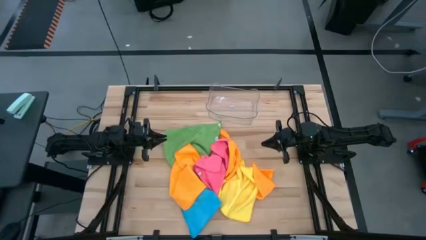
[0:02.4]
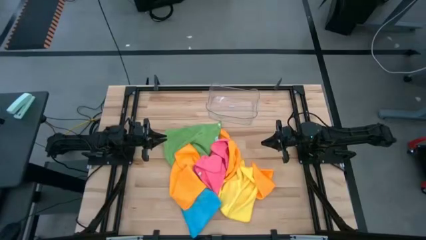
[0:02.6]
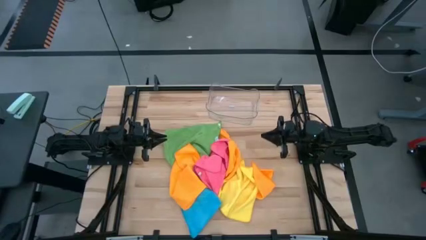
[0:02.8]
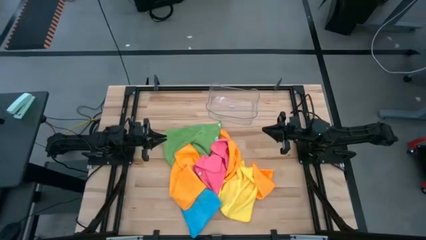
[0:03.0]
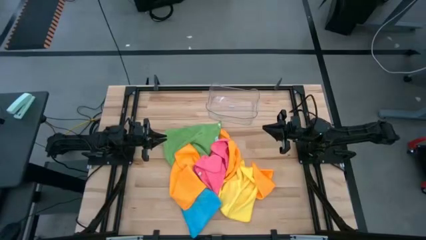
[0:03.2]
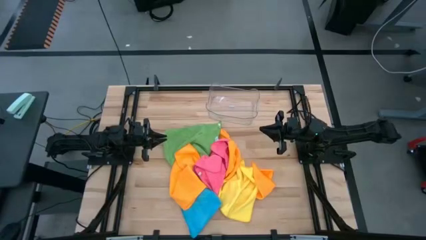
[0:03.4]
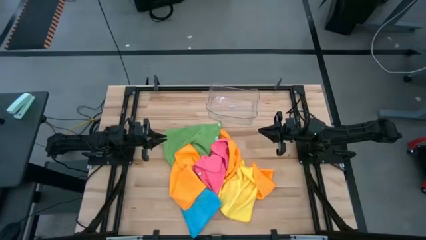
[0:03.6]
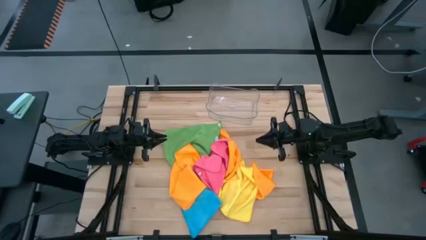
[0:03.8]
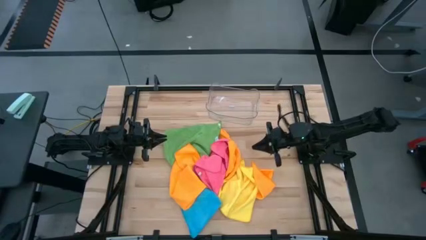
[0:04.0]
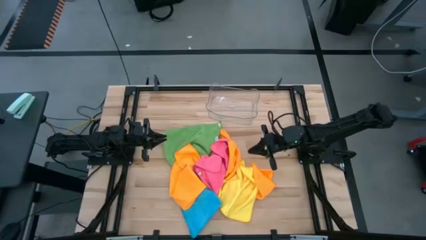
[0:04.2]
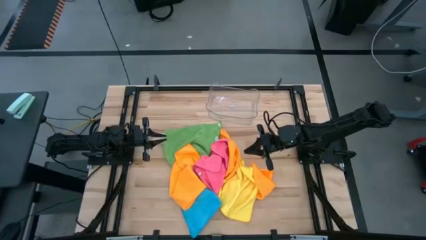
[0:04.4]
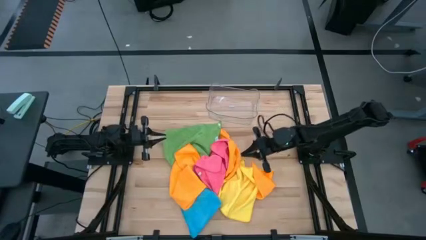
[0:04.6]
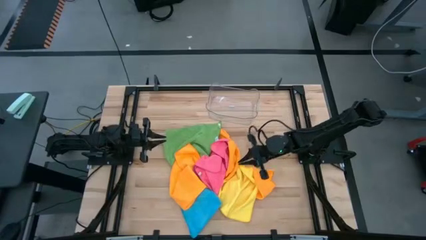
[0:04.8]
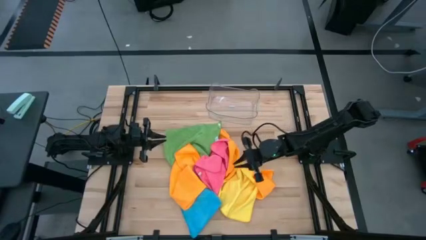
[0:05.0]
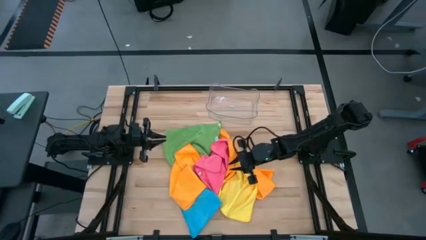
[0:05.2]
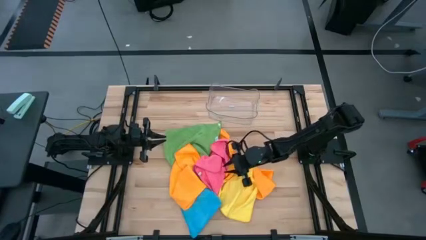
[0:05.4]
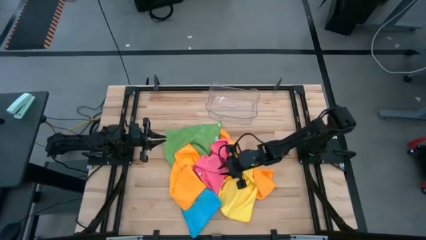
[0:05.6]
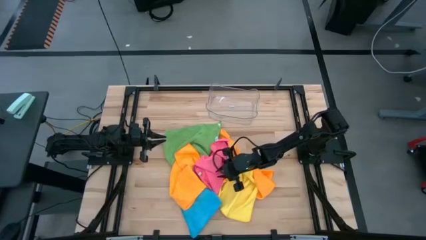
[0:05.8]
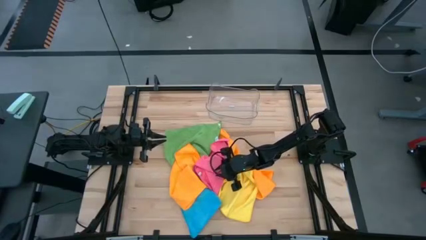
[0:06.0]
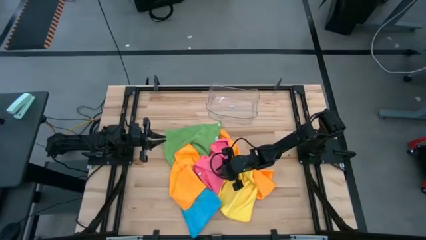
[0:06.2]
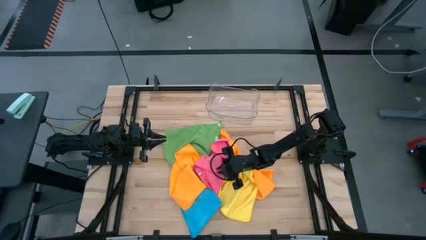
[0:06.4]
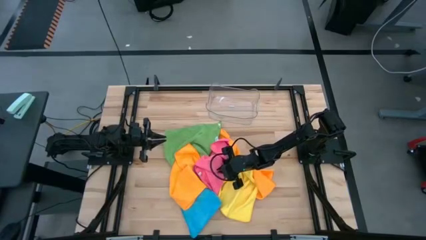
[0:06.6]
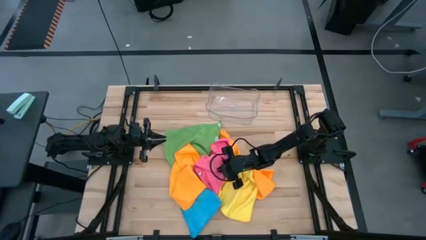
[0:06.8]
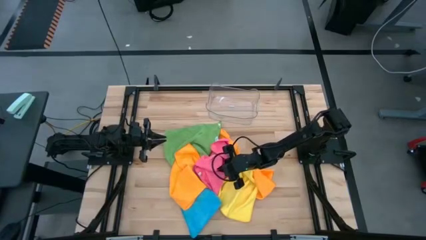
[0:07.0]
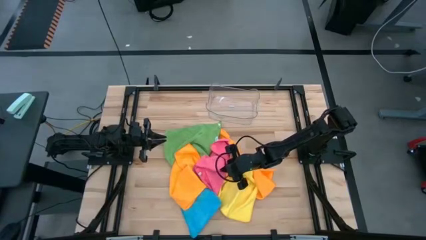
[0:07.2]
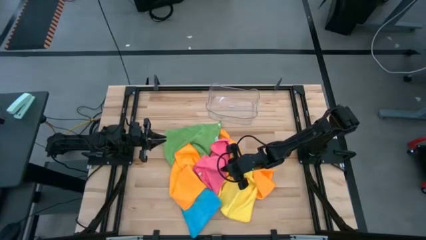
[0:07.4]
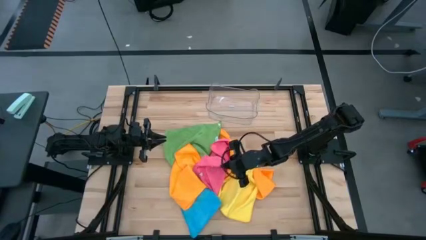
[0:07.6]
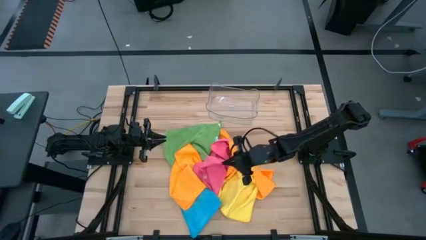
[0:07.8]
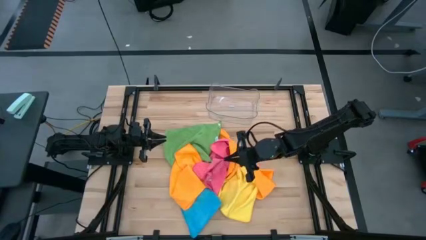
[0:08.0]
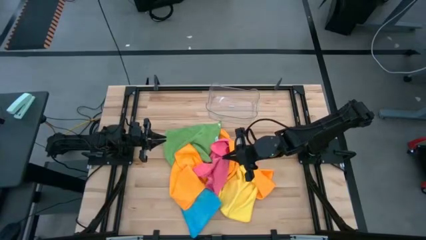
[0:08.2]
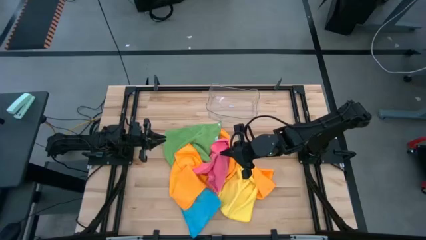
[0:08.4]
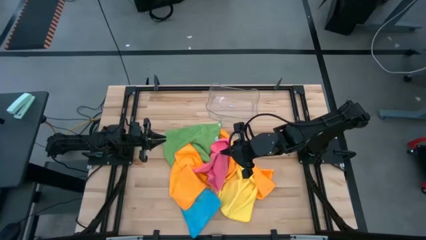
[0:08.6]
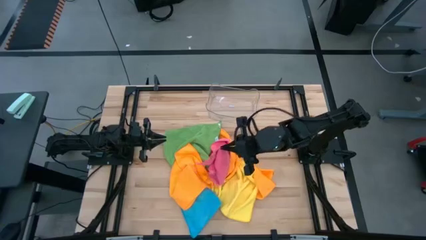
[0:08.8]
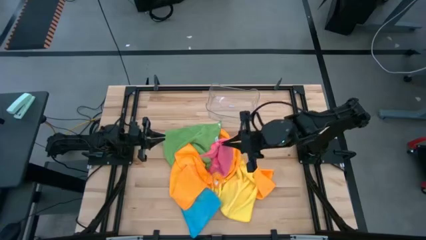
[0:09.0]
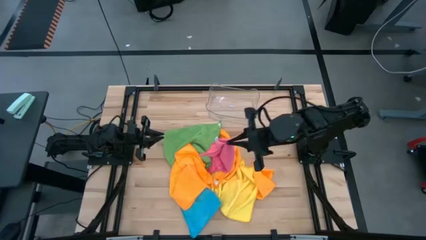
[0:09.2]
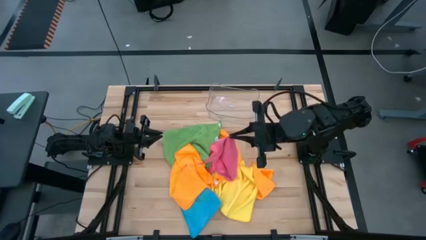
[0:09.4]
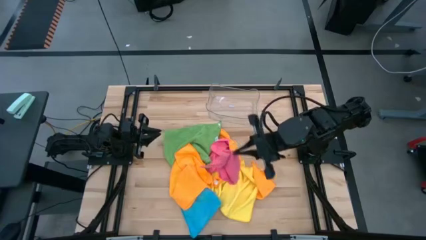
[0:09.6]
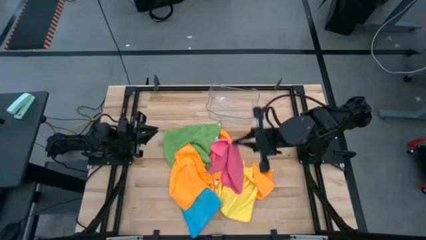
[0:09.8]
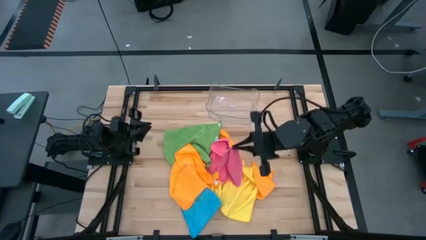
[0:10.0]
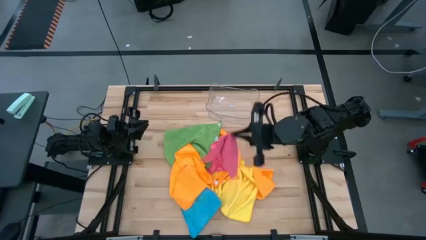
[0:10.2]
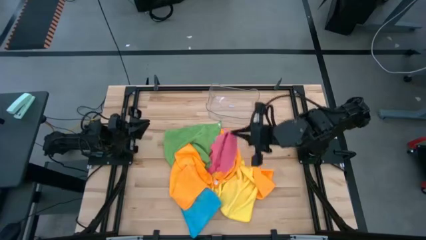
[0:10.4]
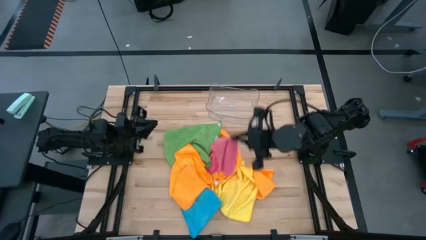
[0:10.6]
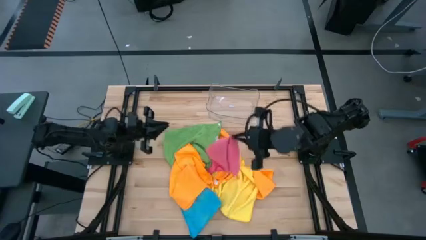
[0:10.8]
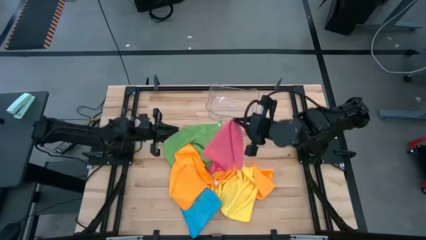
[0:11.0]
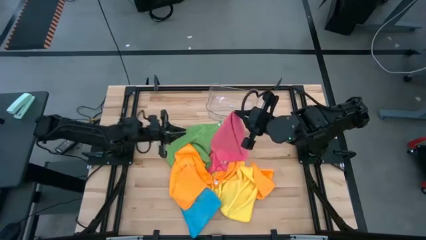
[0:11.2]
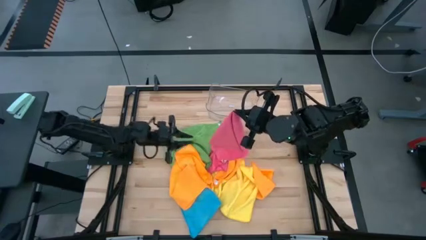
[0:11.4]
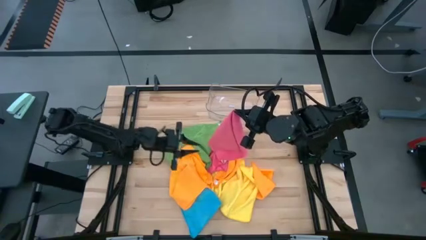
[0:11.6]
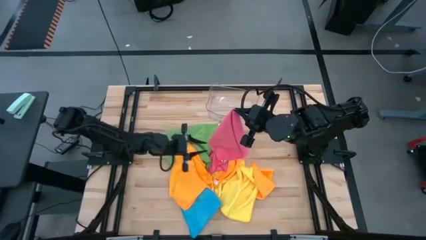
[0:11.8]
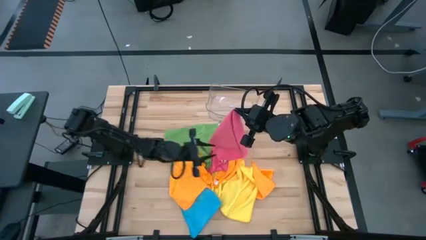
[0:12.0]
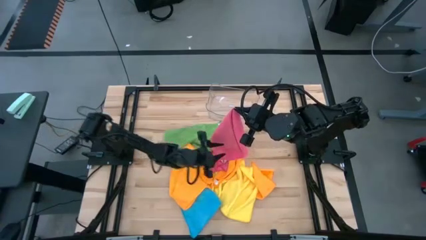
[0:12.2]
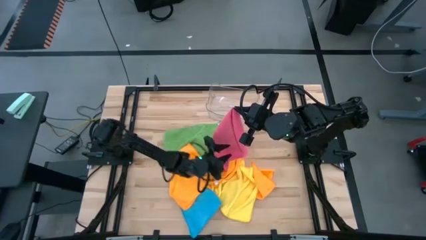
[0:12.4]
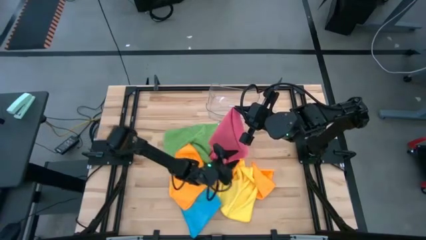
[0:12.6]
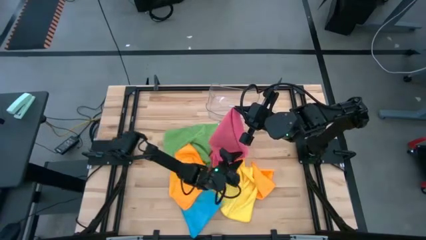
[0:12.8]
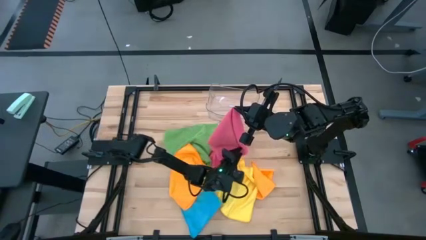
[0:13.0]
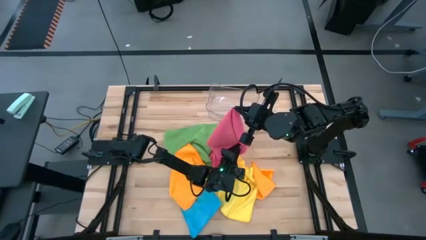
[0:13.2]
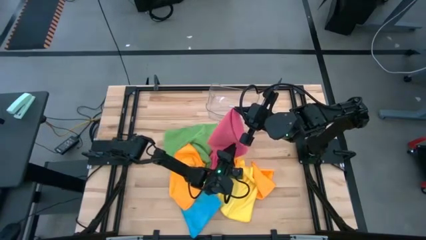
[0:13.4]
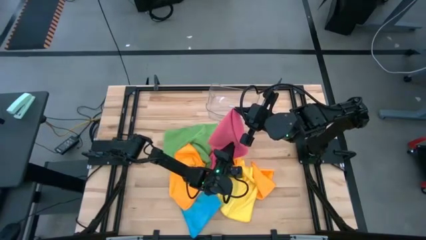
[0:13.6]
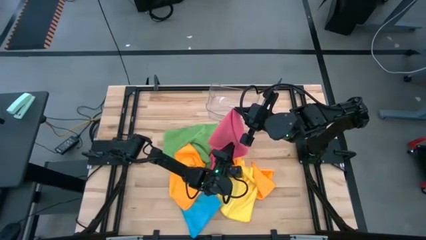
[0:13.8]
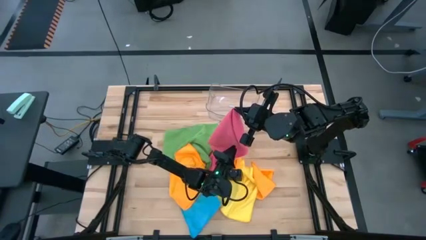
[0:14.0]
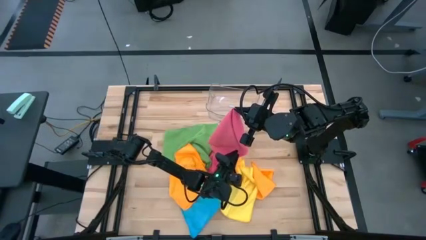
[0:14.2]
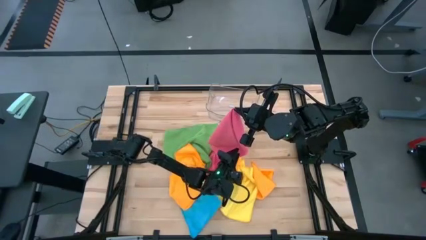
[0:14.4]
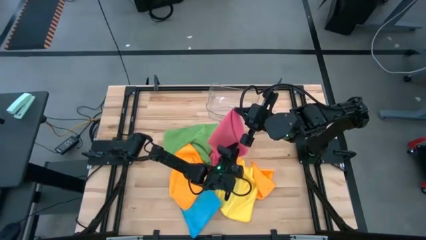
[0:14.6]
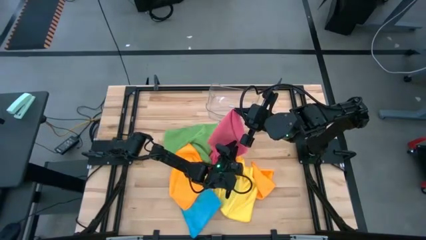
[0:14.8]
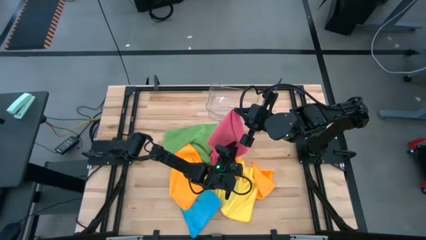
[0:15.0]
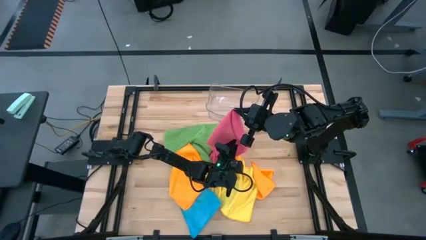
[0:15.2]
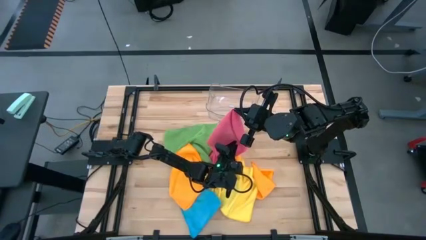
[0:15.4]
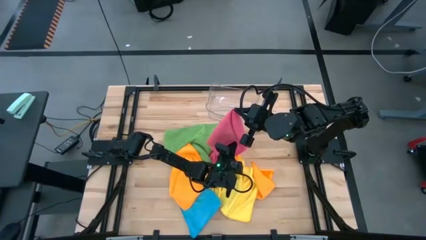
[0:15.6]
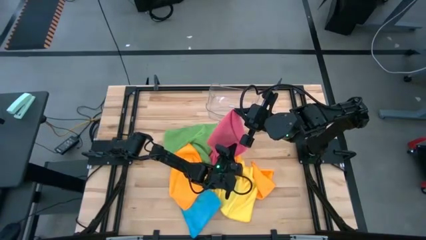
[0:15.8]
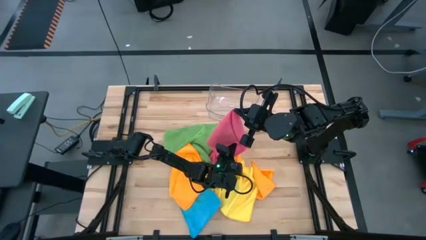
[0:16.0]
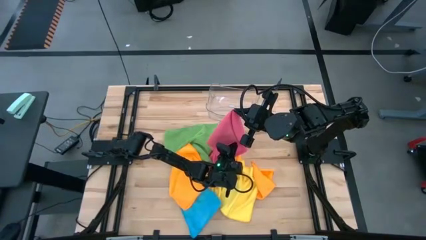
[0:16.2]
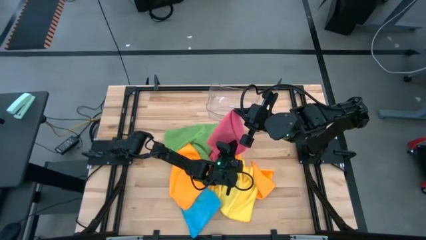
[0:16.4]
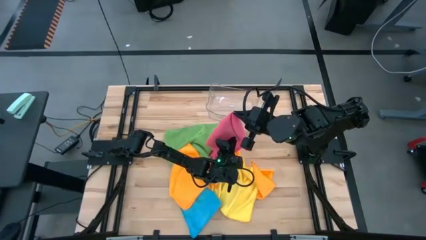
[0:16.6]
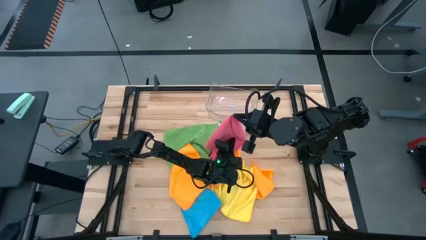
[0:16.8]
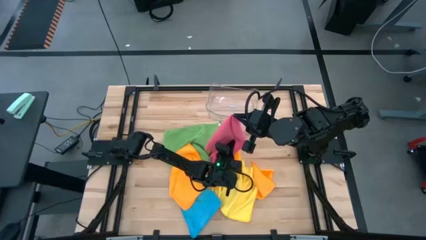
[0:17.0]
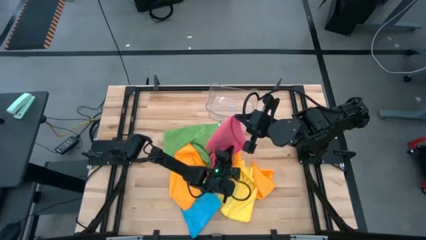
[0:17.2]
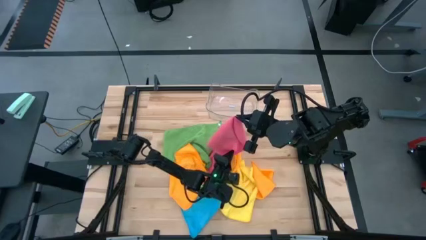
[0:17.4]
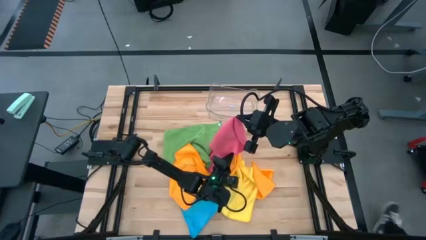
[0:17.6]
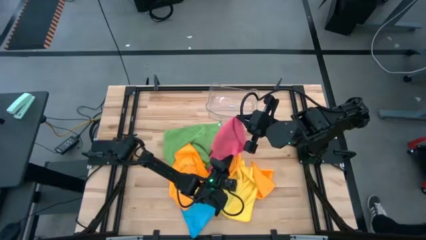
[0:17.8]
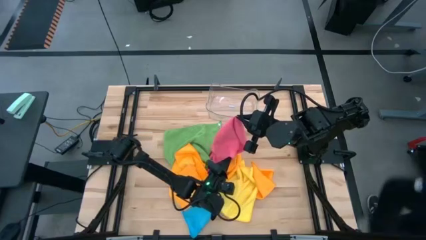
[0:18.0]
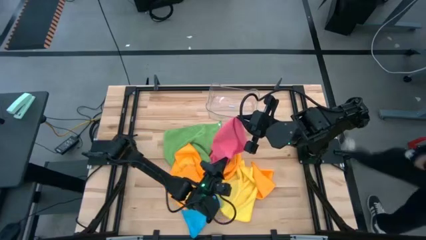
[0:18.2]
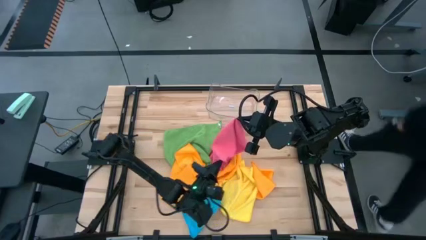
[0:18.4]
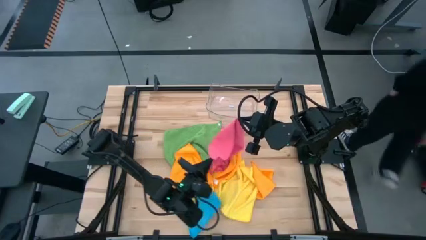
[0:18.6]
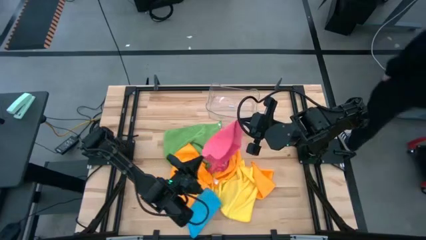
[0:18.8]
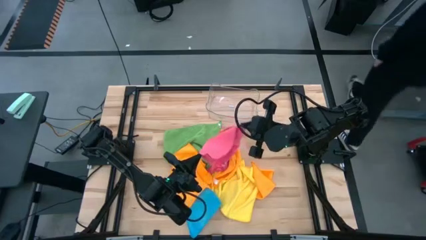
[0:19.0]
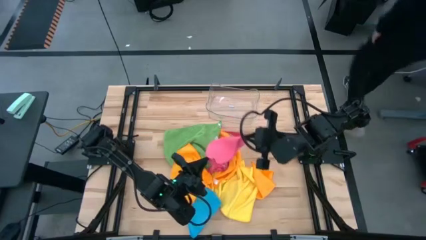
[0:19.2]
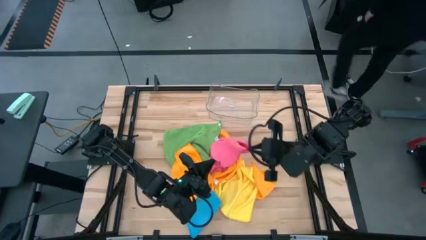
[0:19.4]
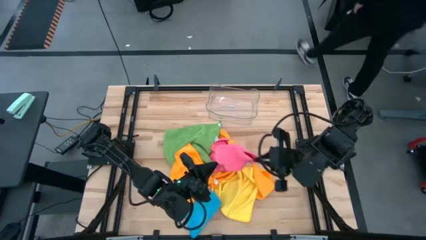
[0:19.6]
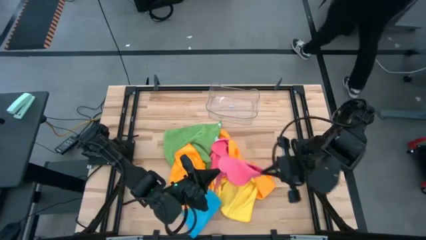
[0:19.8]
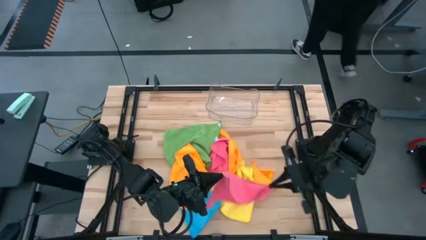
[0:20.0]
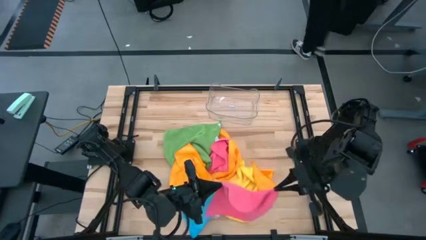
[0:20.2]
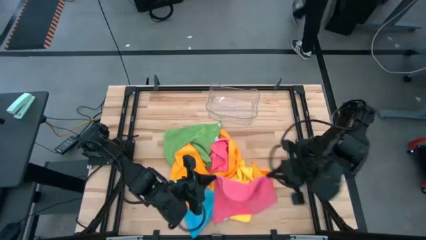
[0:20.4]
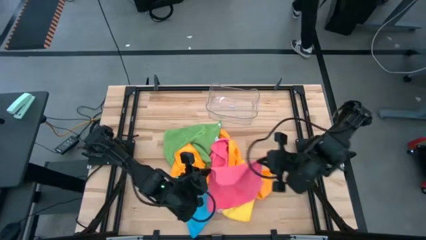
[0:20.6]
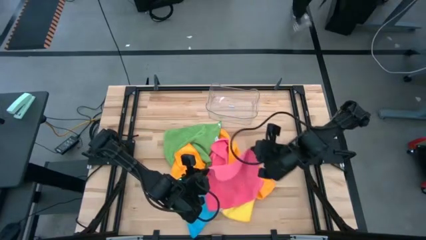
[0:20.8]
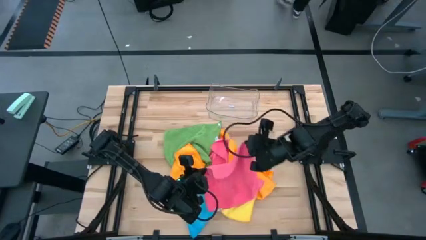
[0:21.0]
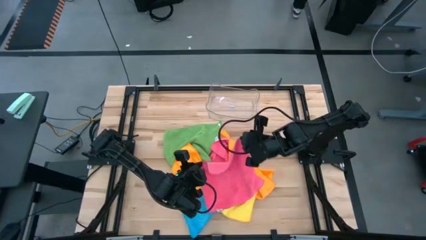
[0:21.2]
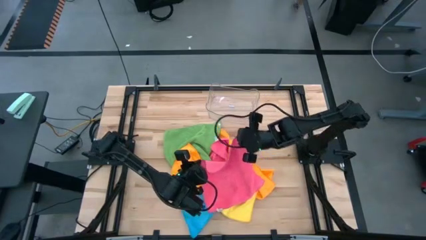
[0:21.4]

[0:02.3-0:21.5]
Task: Fold microfiber towels
Fold the pink microfiber cloth
